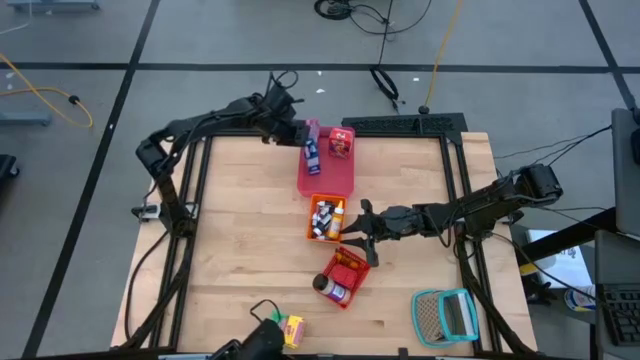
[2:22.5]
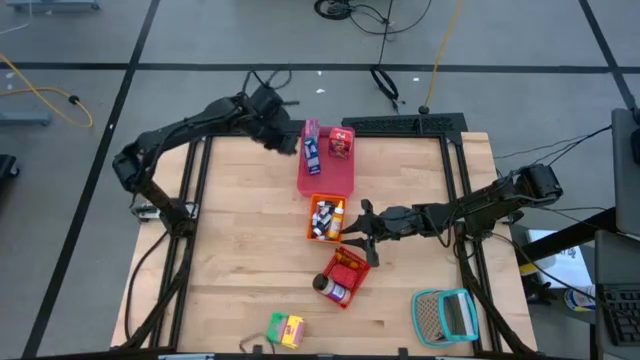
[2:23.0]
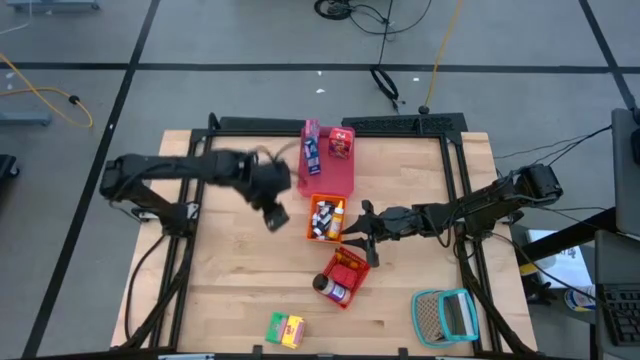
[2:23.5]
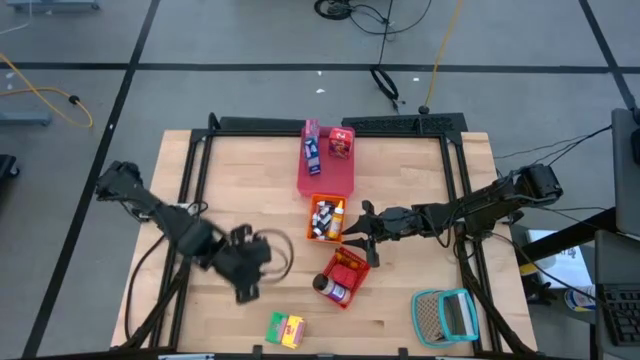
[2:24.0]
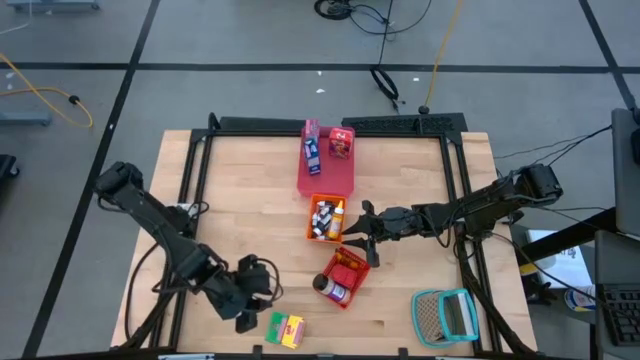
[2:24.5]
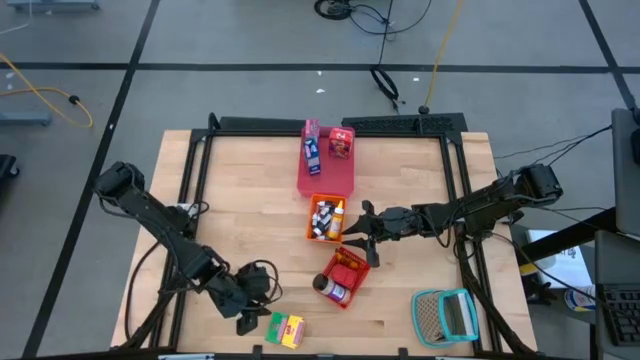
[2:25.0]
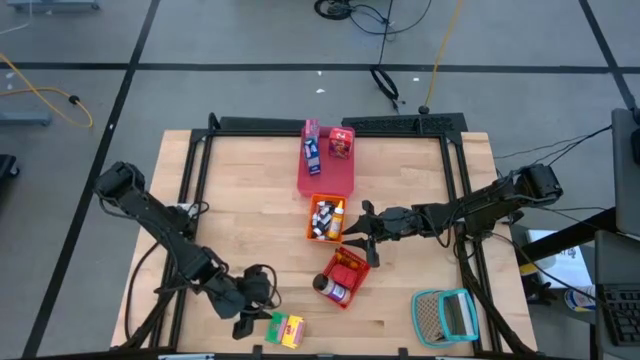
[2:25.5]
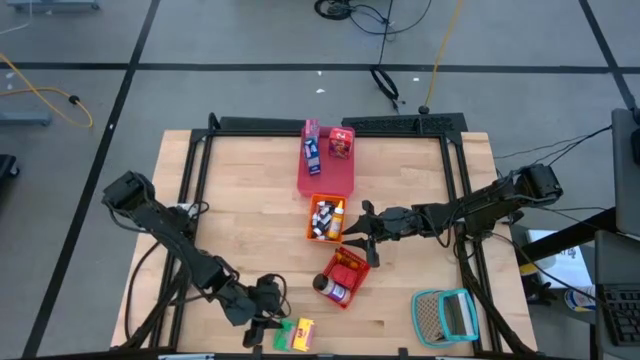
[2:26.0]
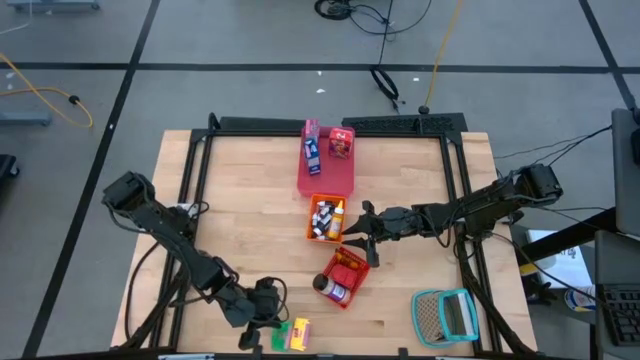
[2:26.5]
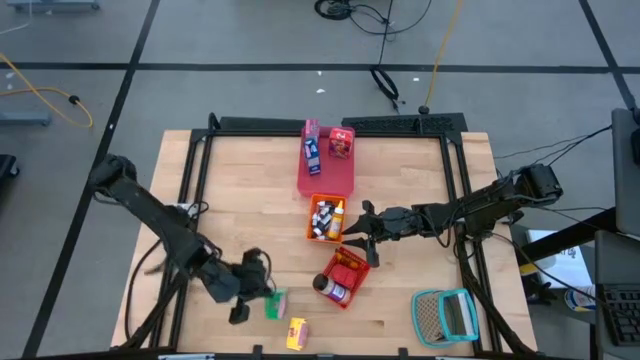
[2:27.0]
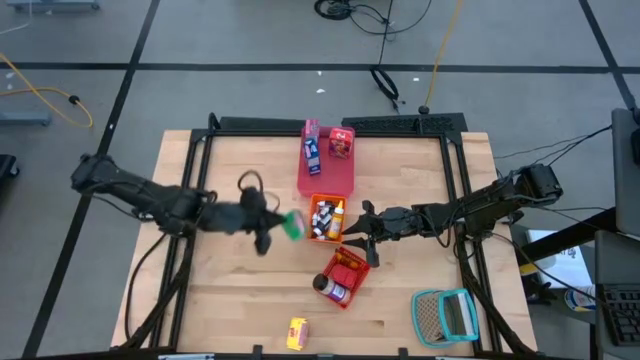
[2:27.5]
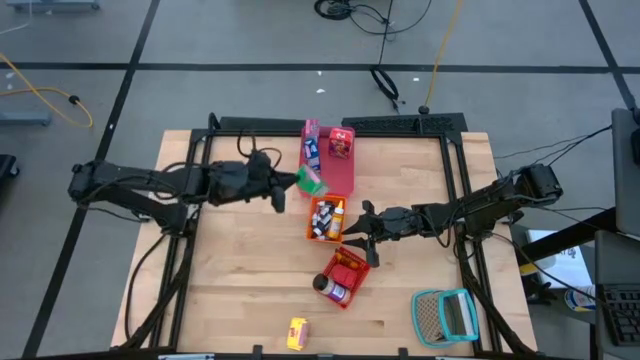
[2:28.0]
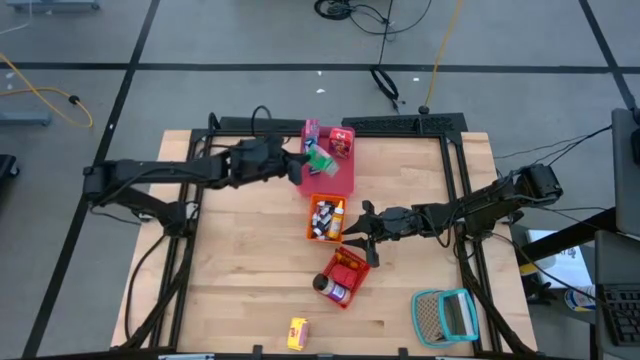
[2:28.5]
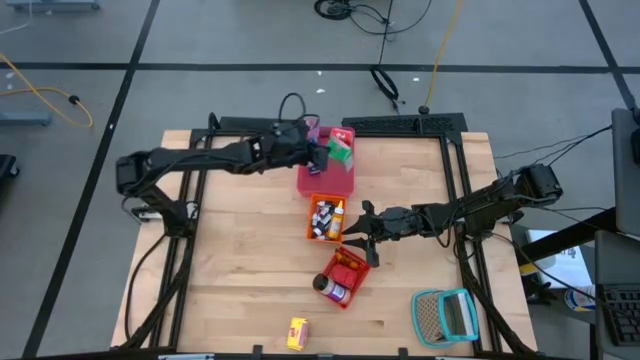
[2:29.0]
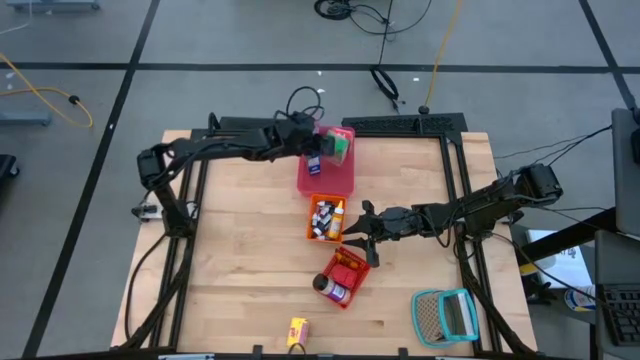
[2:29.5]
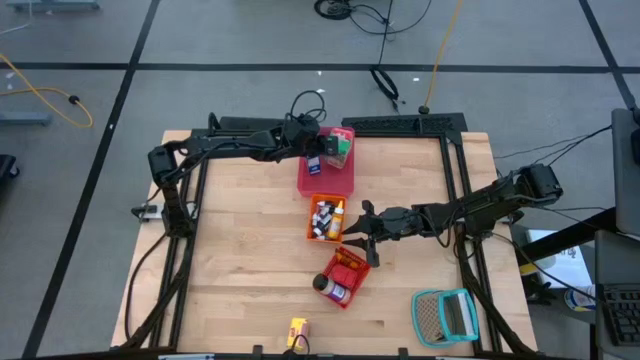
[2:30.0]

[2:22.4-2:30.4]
Task: Pick & Place Kitchen Items
Put the green cereal box into the red bin

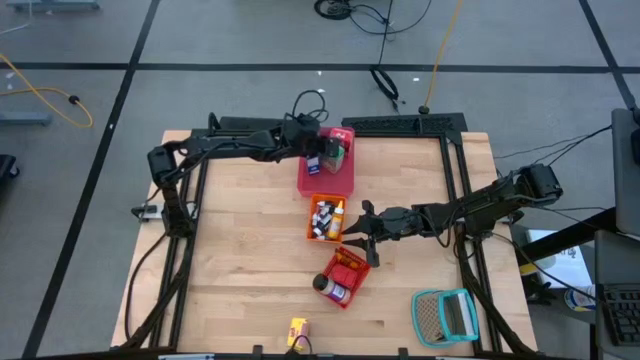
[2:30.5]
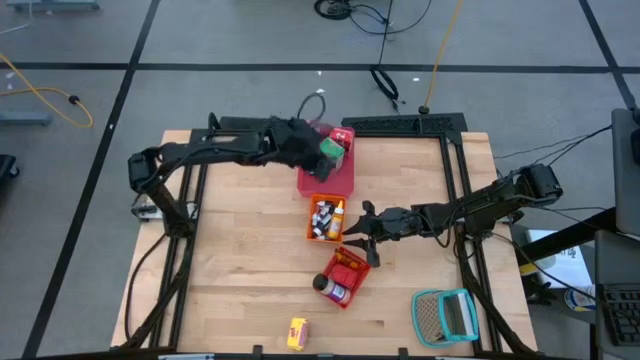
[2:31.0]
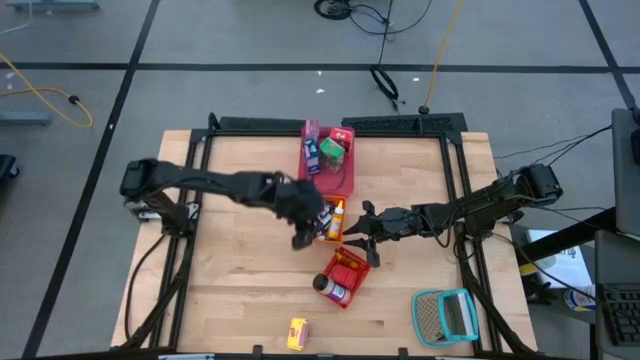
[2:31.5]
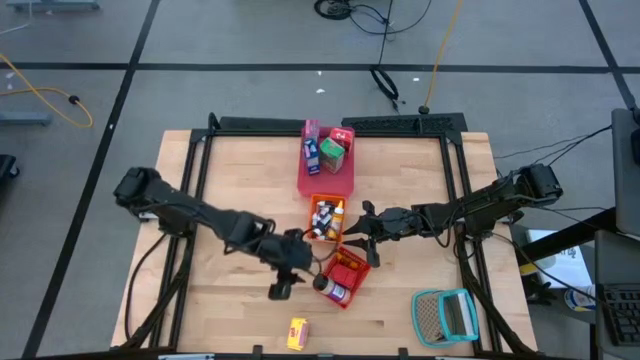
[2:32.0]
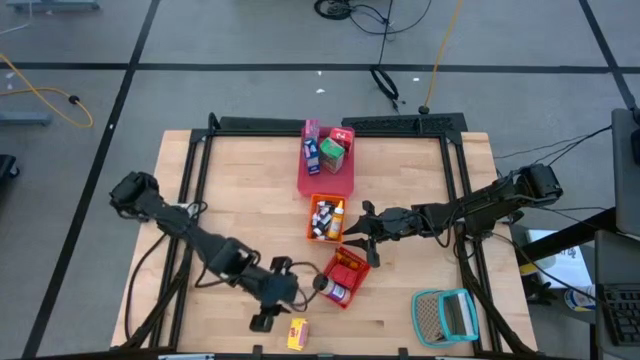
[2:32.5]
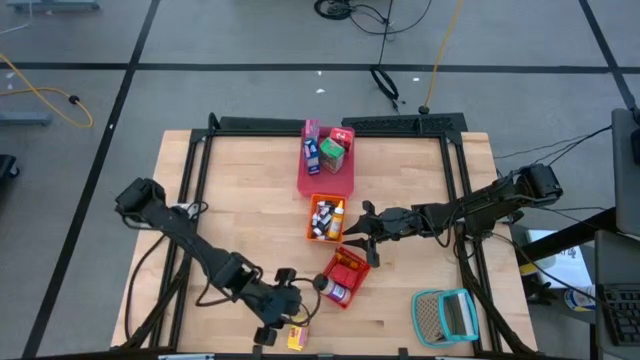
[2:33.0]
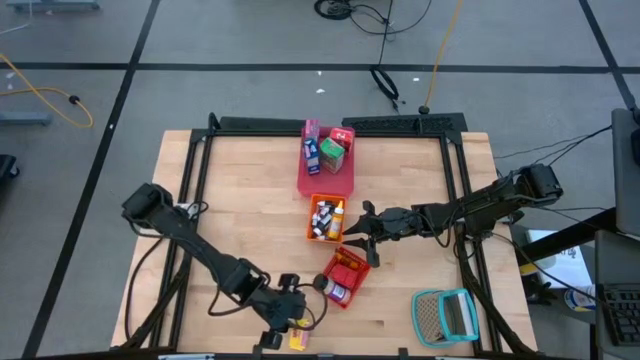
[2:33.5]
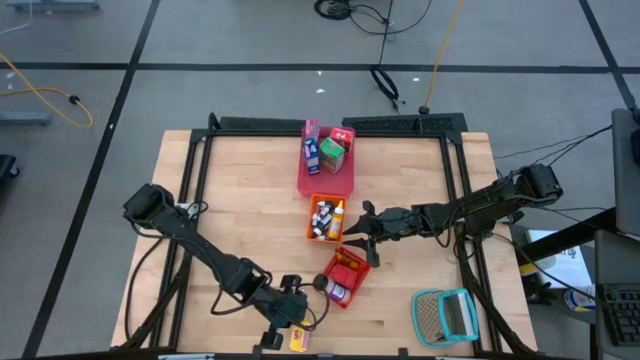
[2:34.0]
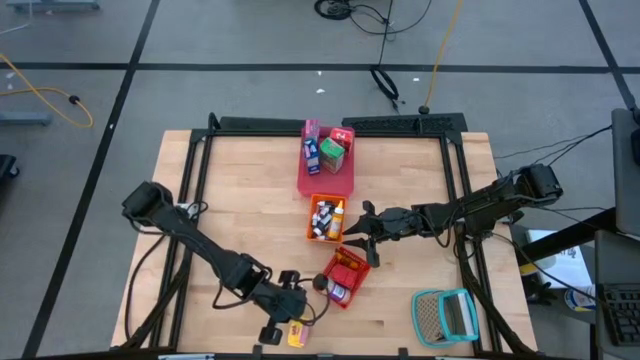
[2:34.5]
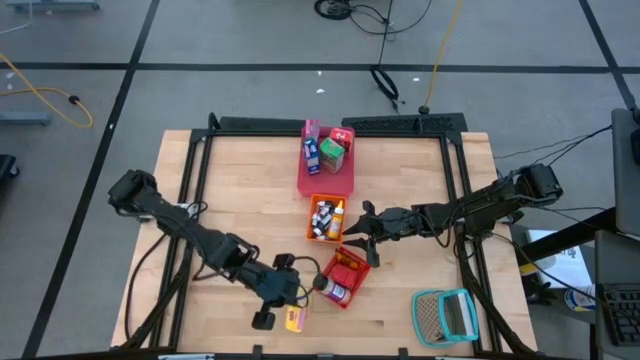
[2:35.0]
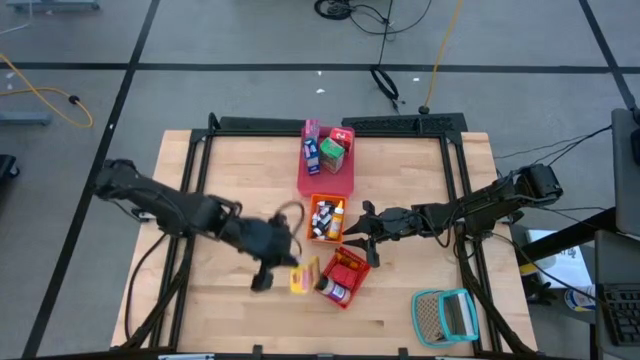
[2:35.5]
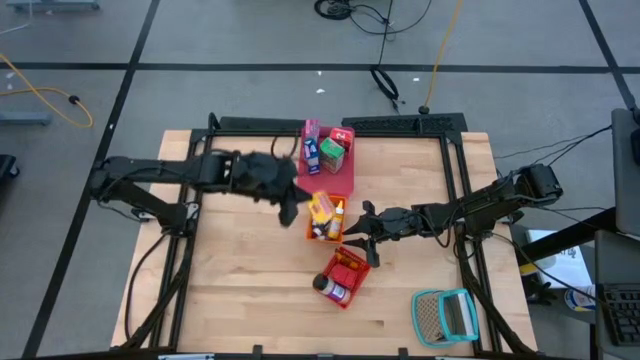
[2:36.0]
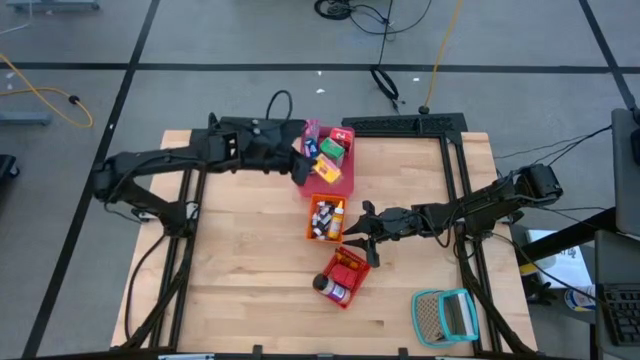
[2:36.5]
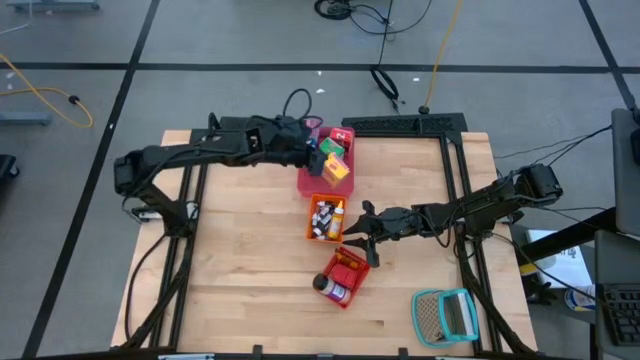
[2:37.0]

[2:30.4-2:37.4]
Put the yellow cereal box into the red bin

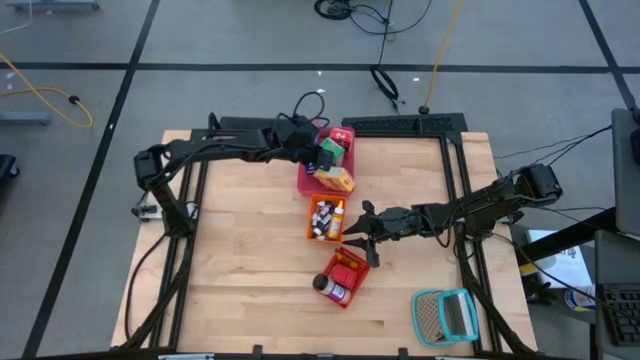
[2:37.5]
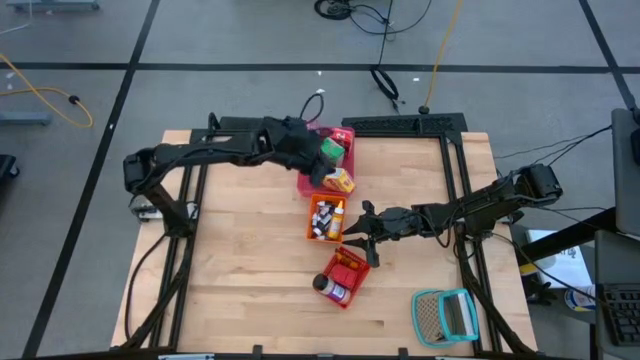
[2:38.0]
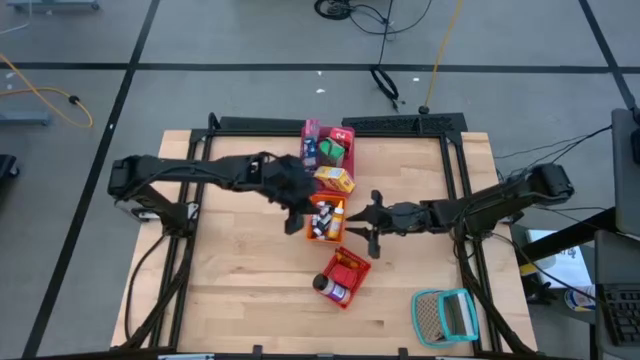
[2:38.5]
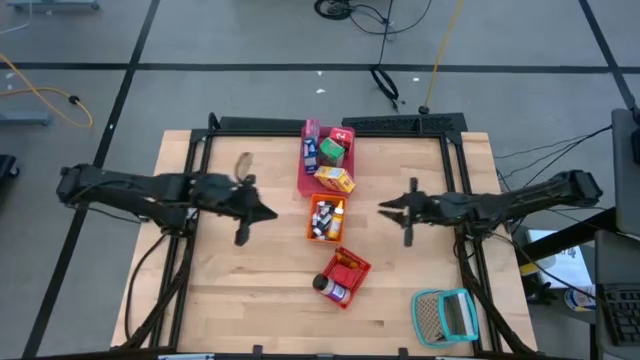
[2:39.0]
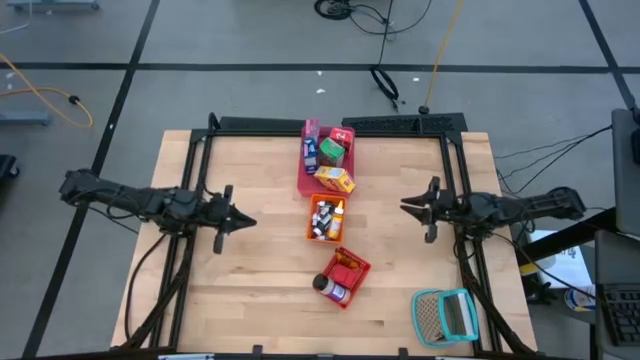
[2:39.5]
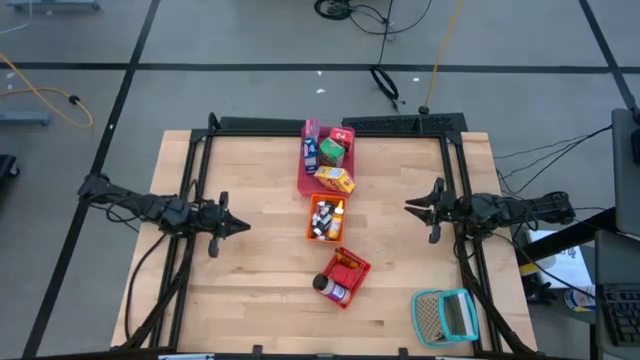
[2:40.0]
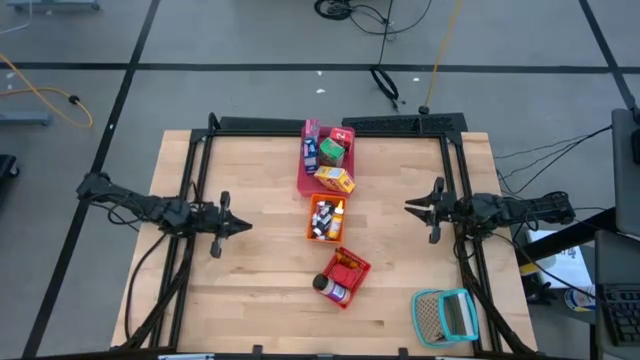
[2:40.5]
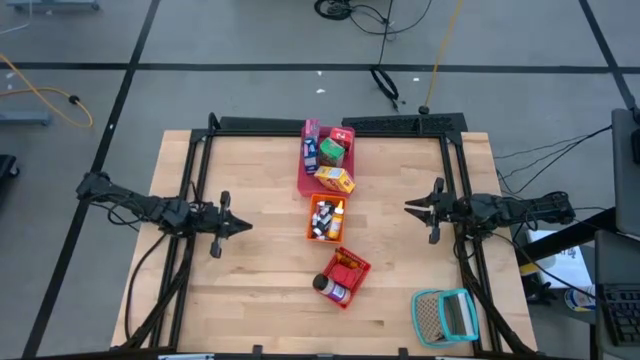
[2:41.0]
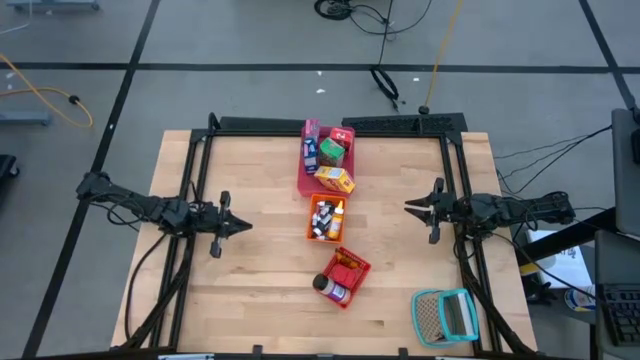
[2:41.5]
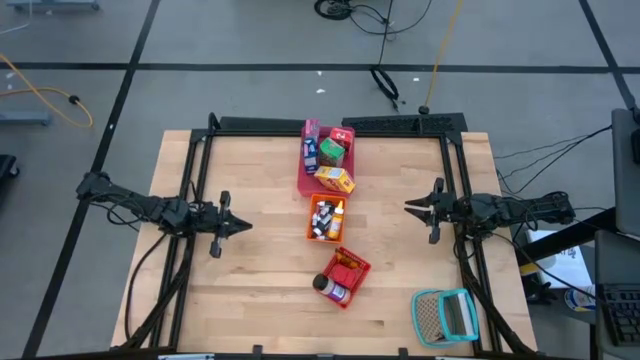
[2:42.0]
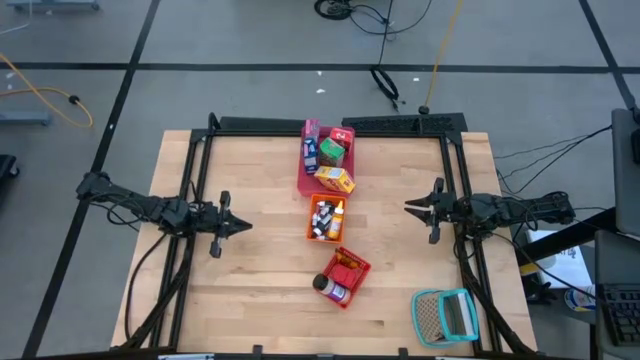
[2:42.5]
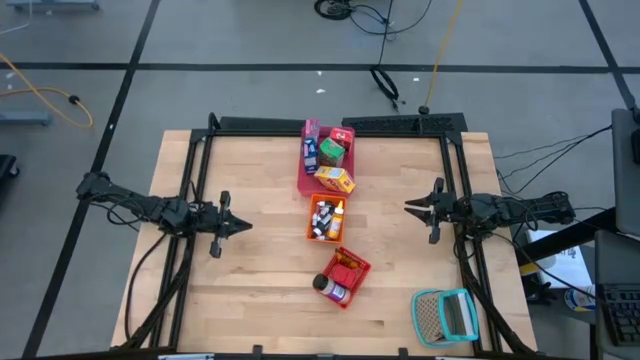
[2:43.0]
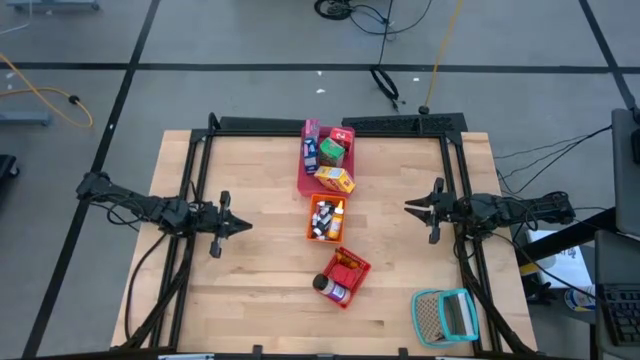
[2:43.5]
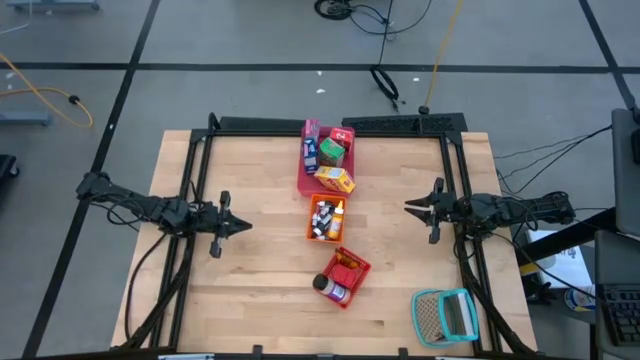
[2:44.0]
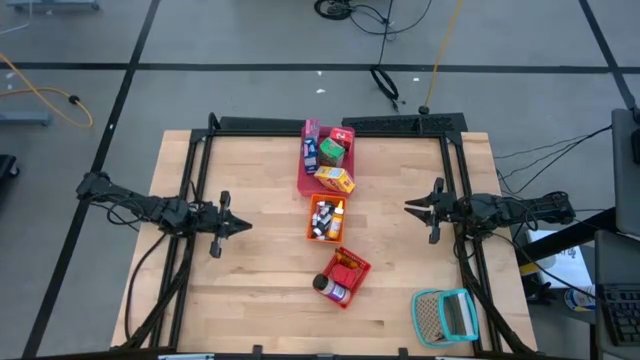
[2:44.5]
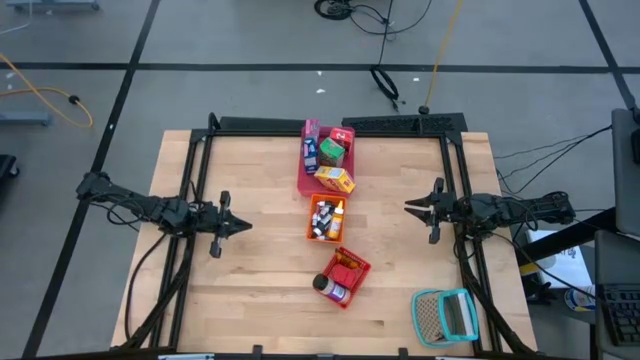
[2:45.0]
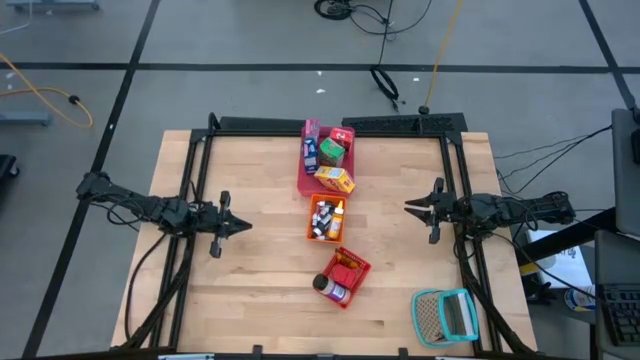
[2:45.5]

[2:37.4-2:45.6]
Return to Home Position
